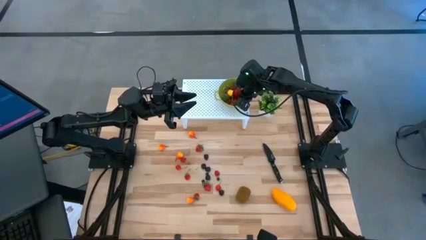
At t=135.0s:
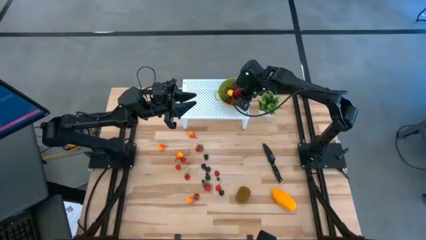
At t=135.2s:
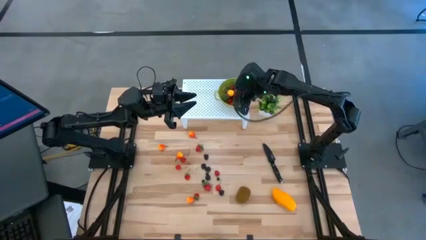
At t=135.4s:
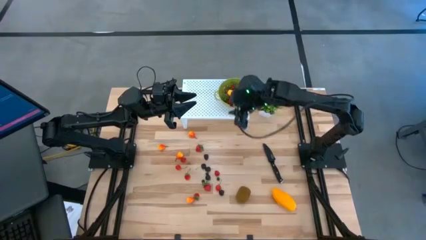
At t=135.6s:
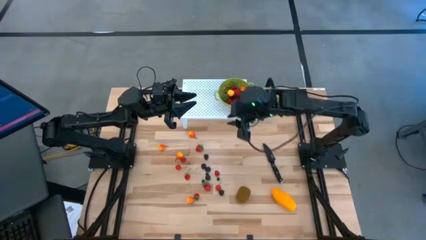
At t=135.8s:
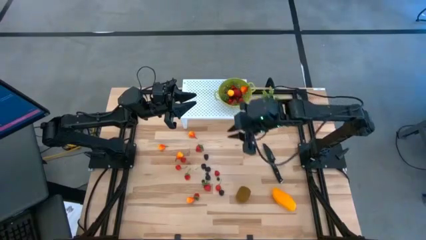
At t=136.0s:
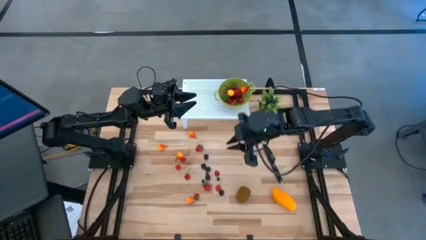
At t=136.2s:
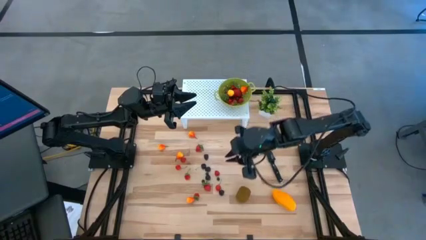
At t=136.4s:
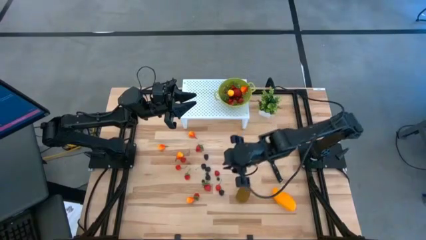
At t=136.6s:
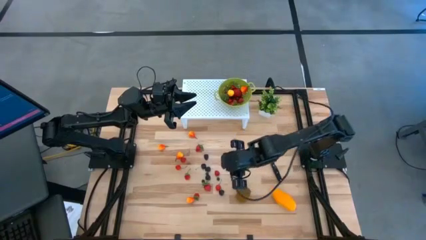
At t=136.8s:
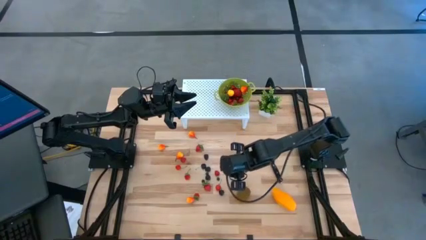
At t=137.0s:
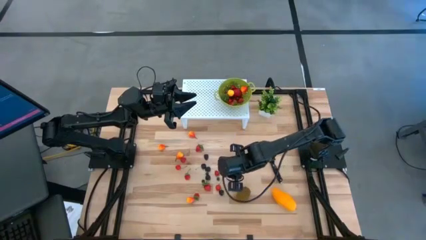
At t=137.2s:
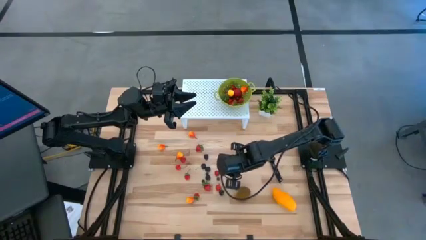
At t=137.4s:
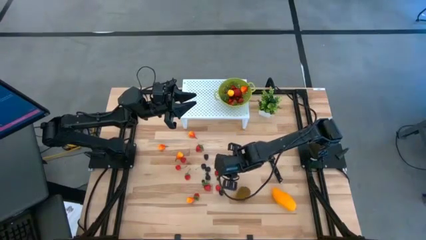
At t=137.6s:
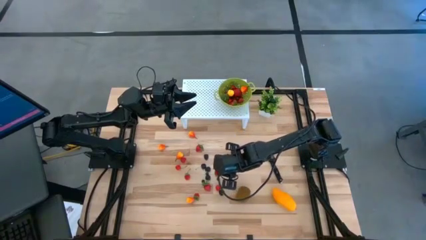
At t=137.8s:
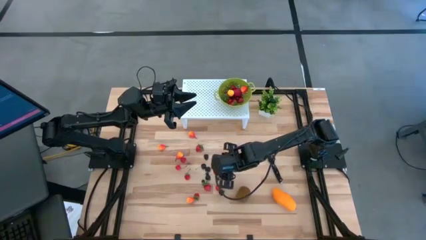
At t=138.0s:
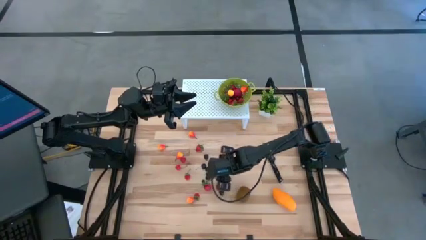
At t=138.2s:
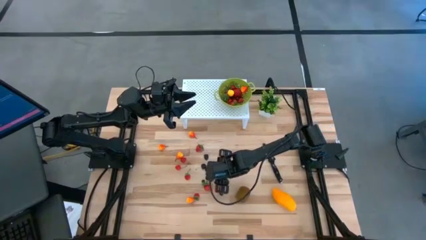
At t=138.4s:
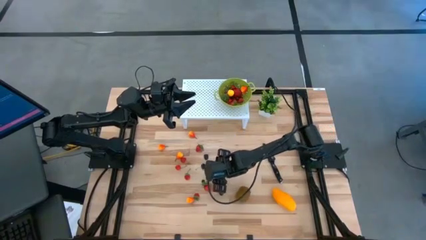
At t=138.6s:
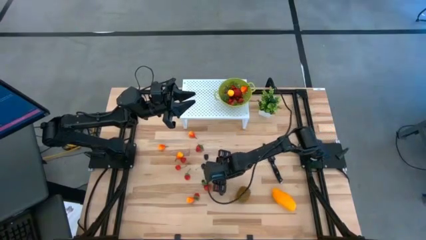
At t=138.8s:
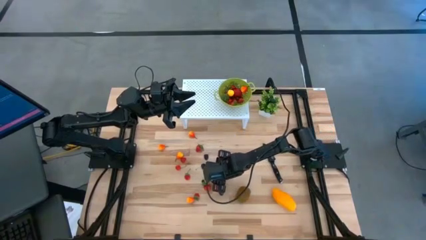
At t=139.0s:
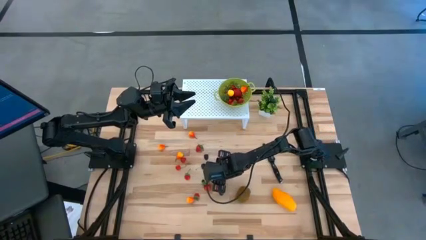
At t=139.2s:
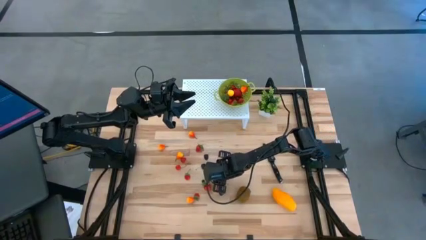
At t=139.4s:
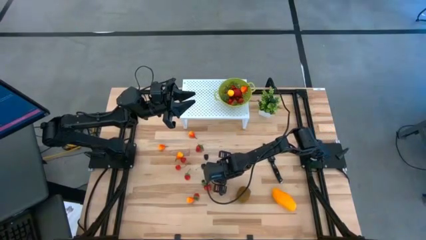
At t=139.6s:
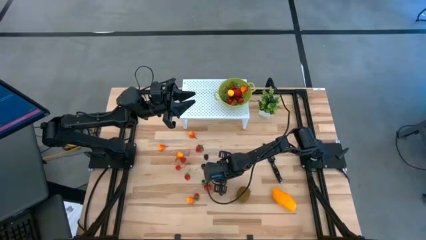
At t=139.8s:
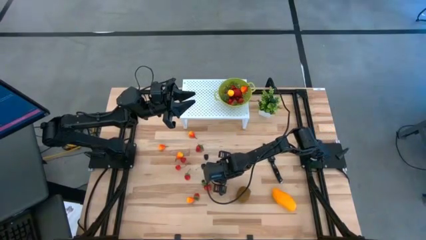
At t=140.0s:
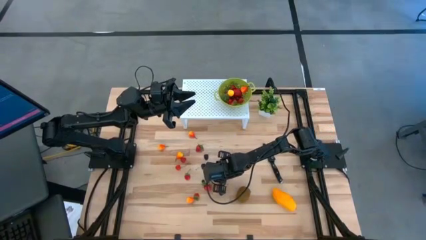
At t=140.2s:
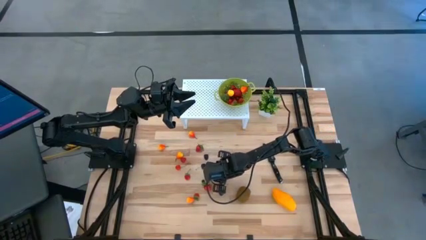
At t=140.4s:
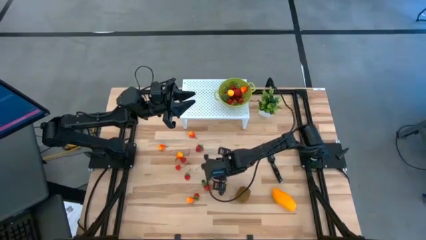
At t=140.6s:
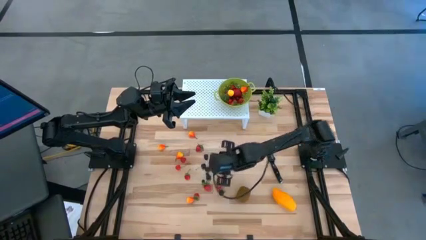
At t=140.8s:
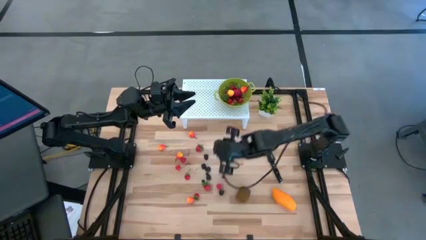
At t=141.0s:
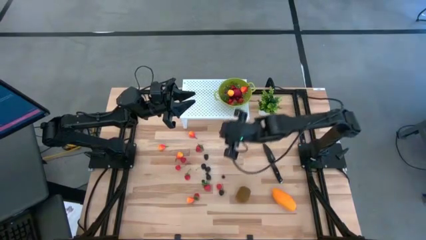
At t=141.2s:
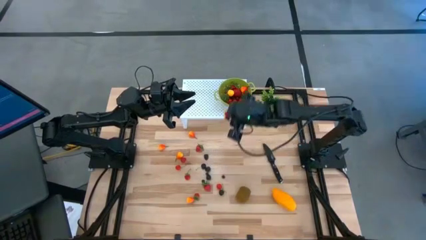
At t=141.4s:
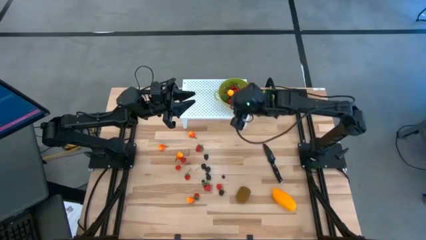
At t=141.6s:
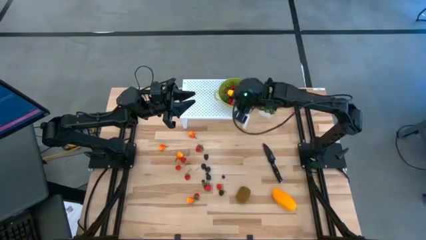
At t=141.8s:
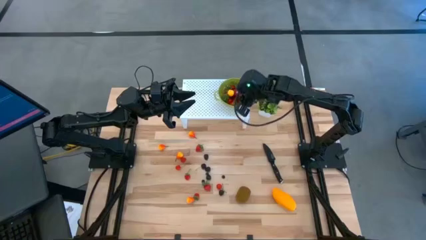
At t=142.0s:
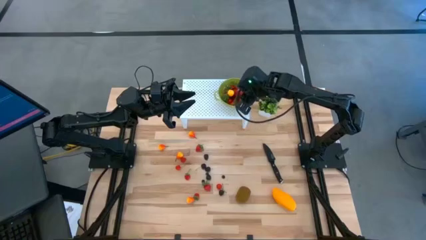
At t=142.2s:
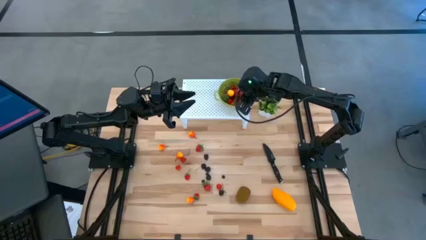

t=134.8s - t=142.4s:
Task: Pick & Place Fruit
Put the red raspberry into the green strainer bowl

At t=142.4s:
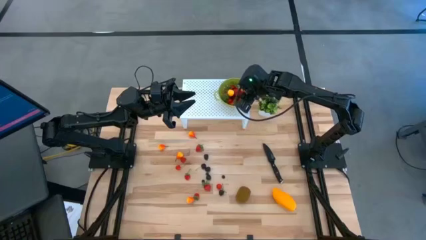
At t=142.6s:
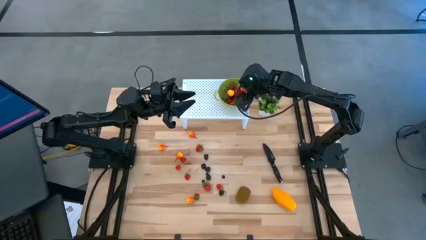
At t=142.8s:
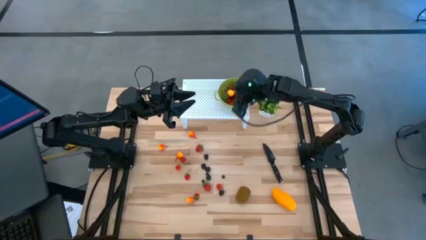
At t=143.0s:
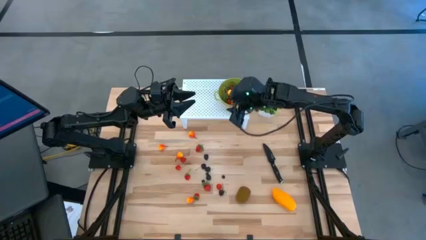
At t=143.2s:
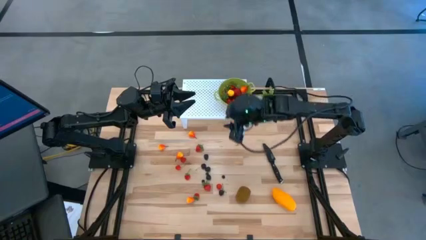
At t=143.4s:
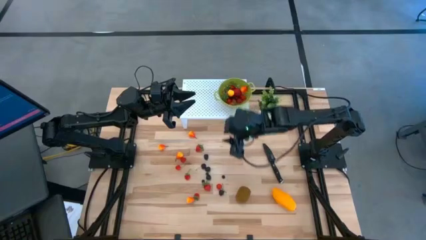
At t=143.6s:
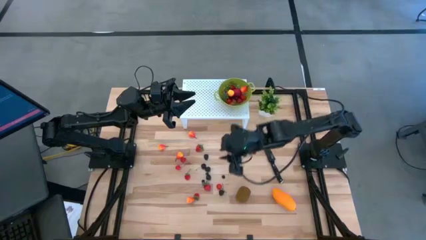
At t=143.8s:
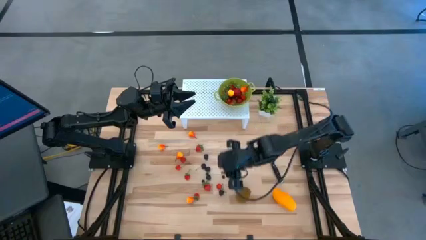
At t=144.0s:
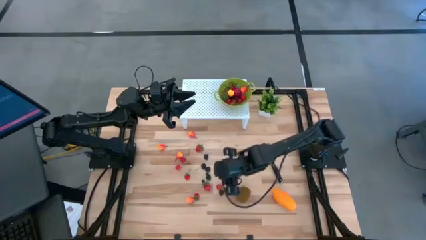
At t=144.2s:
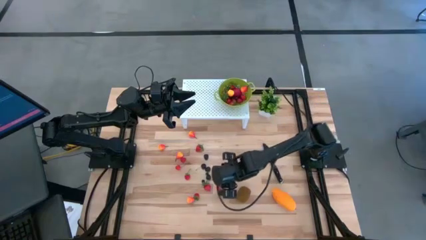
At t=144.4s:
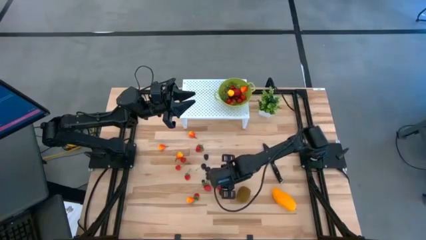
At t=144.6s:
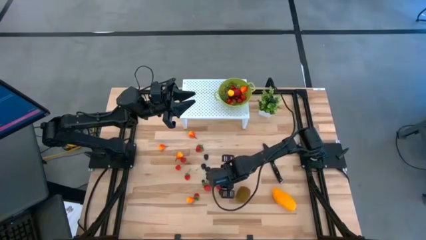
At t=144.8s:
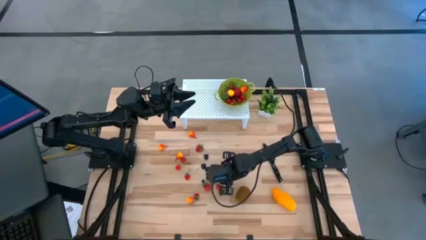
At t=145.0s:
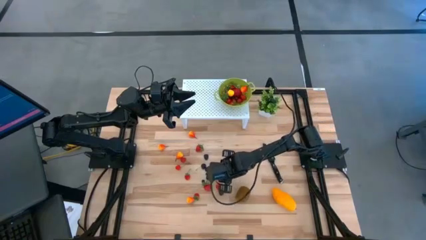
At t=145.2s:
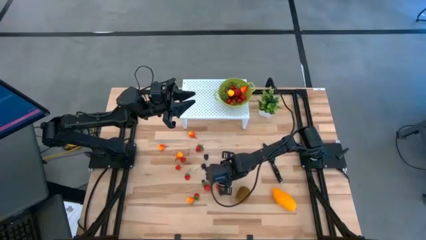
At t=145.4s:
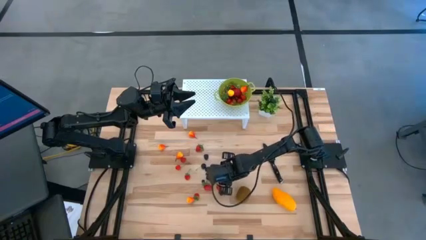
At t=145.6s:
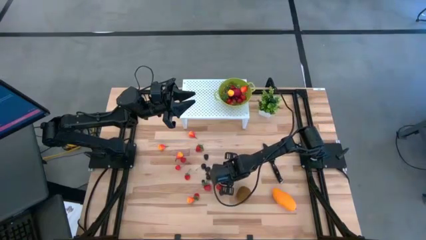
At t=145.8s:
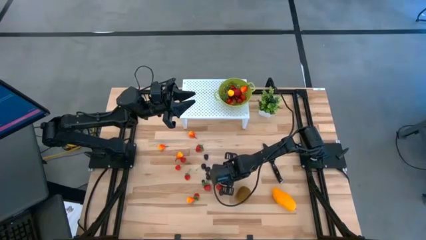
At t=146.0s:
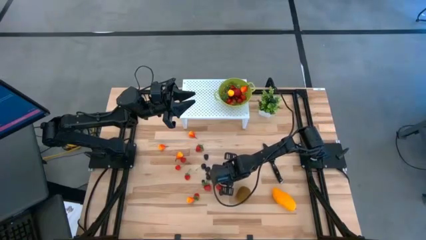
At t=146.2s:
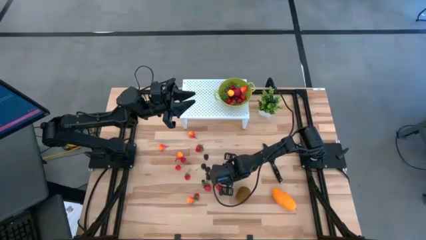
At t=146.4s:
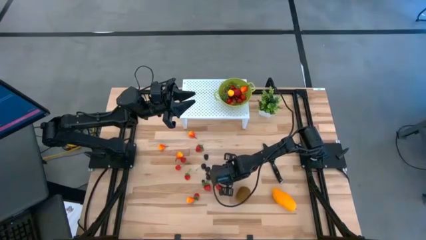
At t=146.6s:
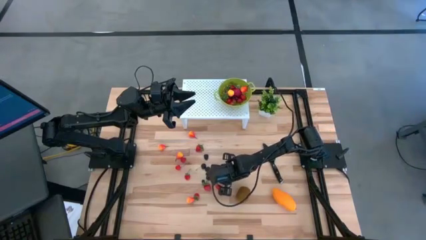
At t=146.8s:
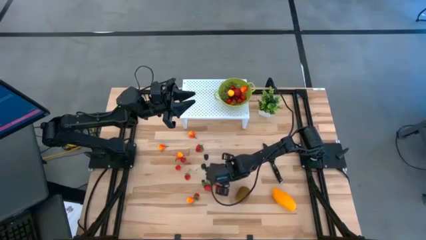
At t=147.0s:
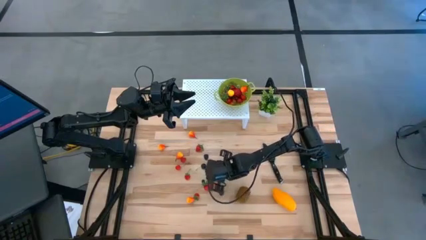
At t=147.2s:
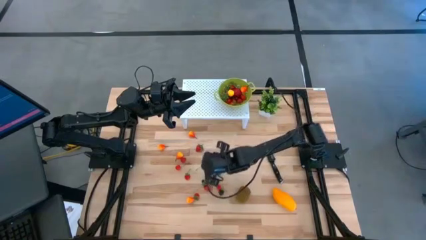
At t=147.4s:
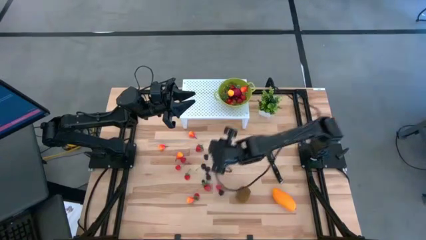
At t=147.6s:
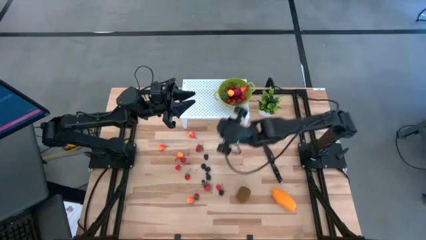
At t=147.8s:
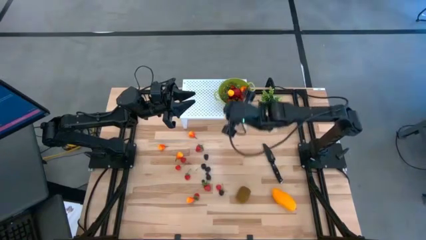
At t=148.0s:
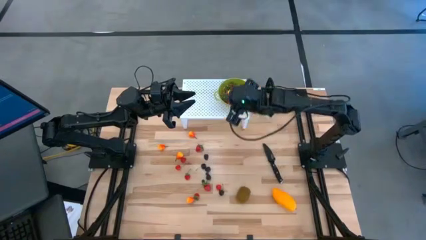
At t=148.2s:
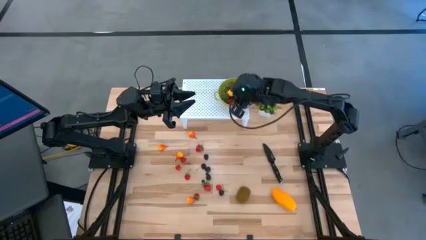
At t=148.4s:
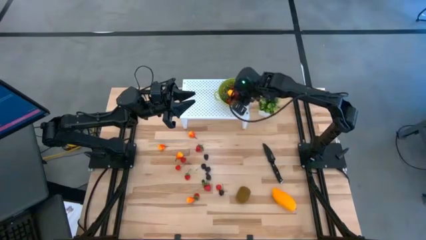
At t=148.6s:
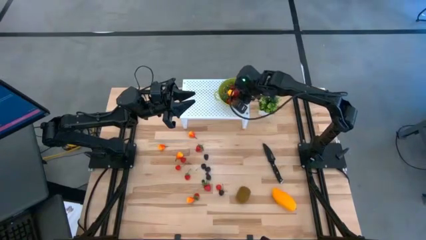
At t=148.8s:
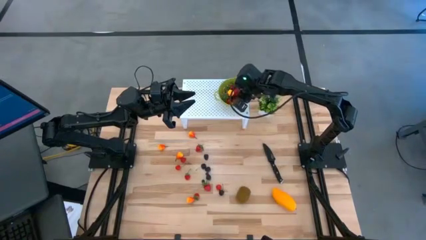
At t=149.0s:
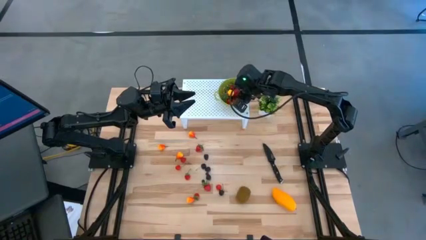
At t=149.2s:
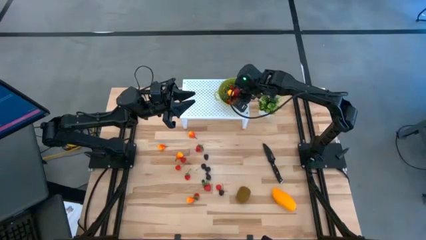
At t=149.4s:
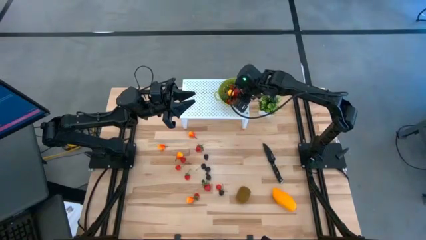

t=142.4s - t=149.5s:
Put the black blueberry into the green strainer bowl
